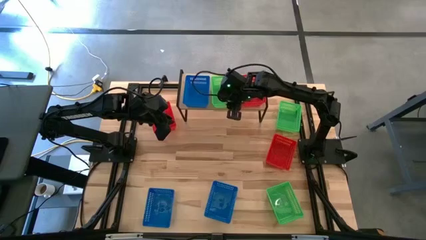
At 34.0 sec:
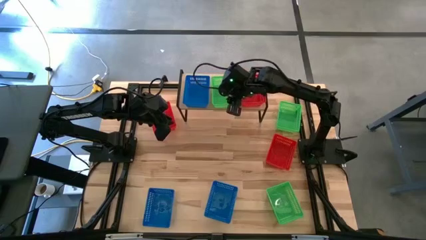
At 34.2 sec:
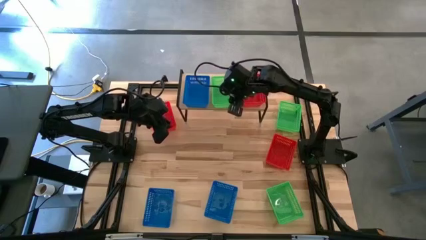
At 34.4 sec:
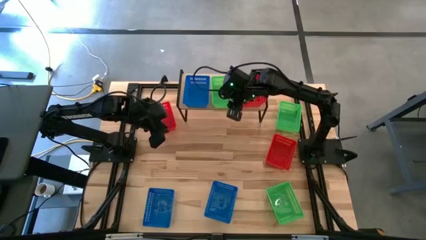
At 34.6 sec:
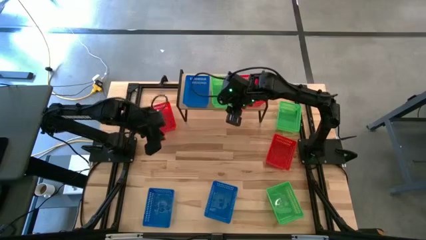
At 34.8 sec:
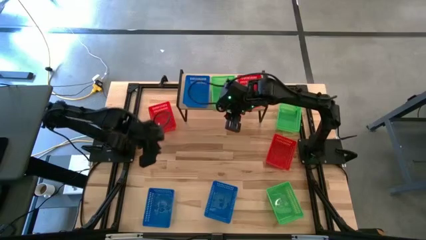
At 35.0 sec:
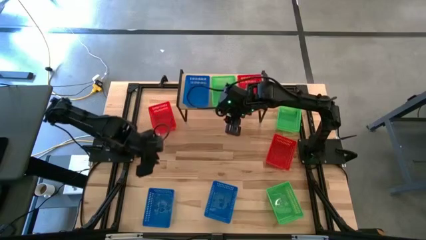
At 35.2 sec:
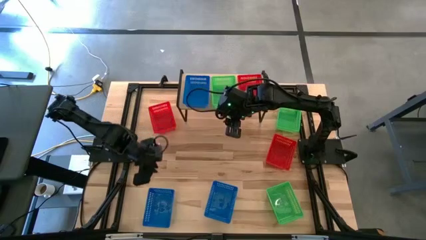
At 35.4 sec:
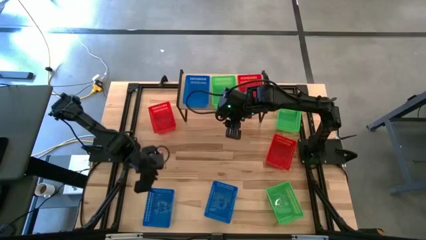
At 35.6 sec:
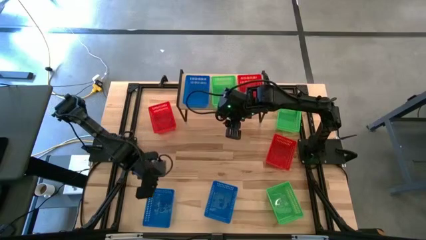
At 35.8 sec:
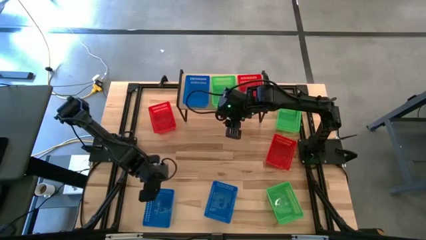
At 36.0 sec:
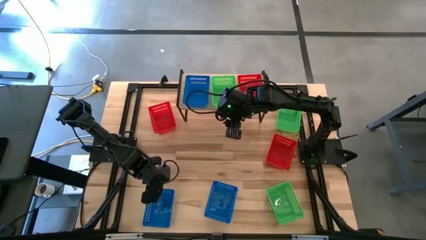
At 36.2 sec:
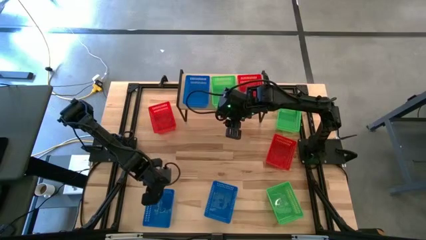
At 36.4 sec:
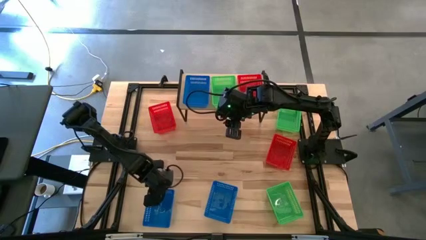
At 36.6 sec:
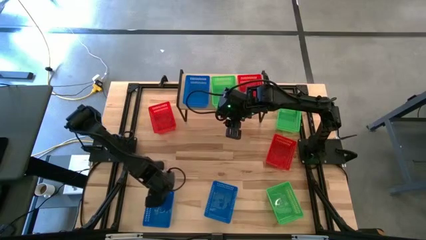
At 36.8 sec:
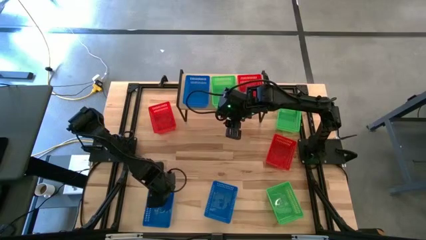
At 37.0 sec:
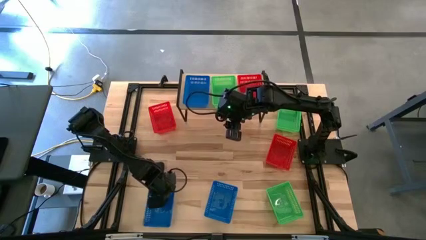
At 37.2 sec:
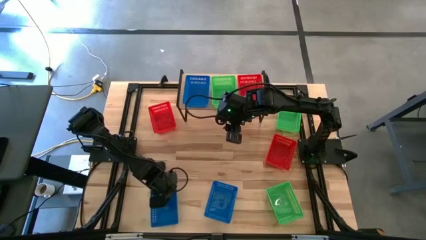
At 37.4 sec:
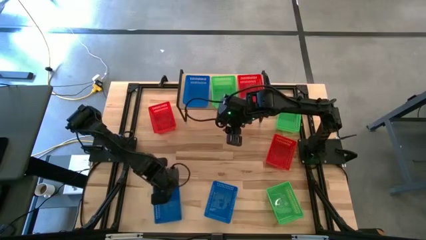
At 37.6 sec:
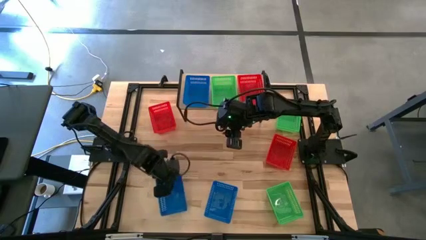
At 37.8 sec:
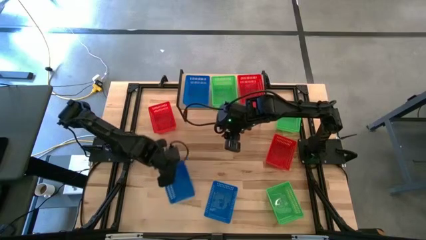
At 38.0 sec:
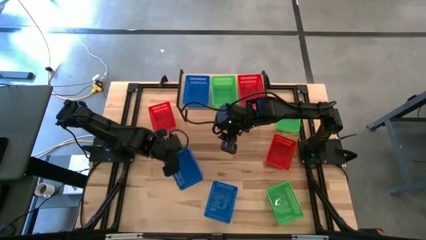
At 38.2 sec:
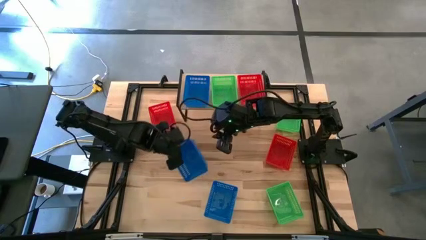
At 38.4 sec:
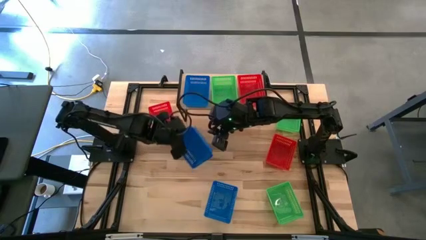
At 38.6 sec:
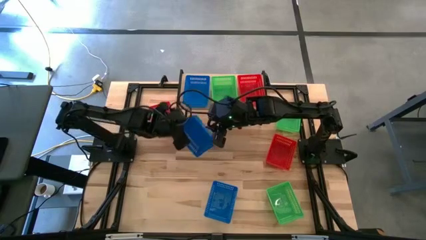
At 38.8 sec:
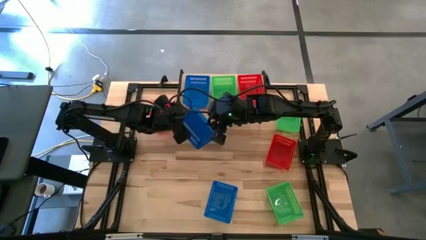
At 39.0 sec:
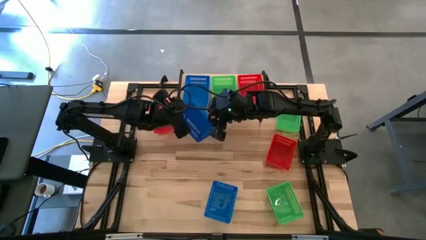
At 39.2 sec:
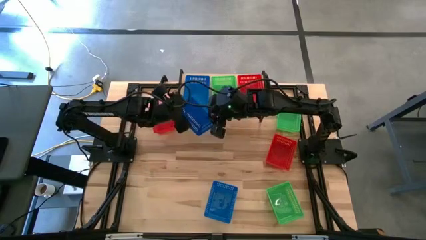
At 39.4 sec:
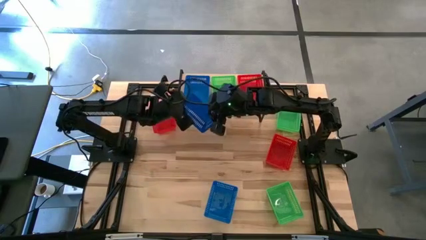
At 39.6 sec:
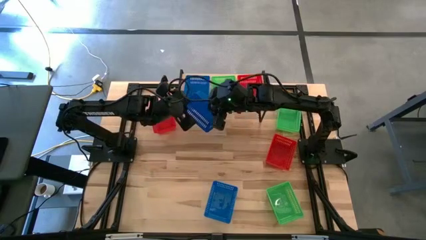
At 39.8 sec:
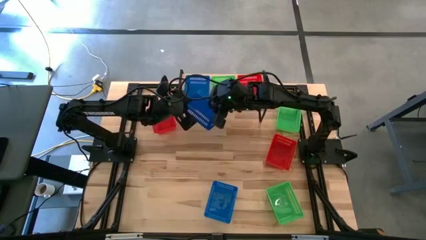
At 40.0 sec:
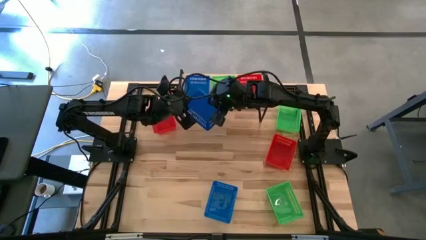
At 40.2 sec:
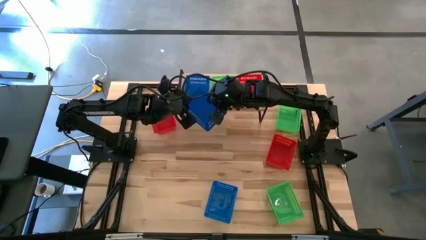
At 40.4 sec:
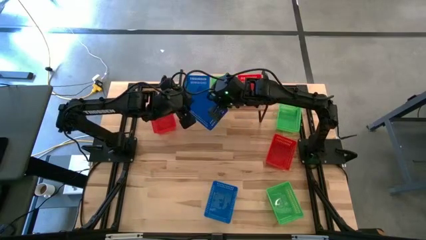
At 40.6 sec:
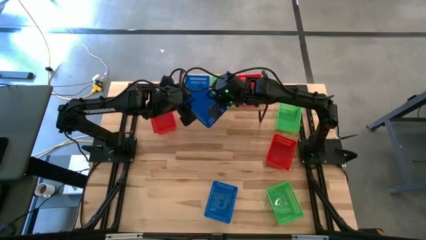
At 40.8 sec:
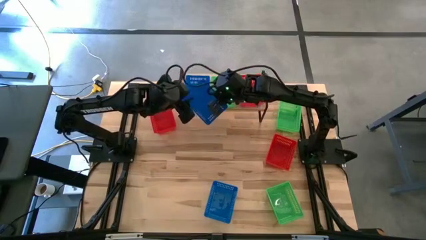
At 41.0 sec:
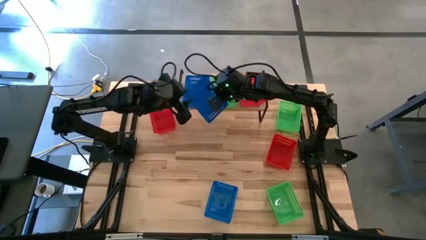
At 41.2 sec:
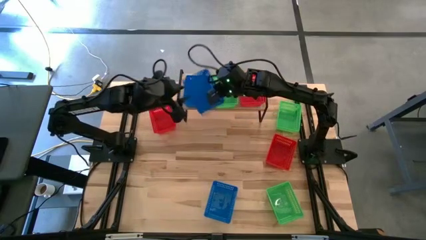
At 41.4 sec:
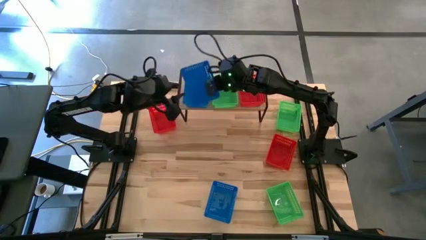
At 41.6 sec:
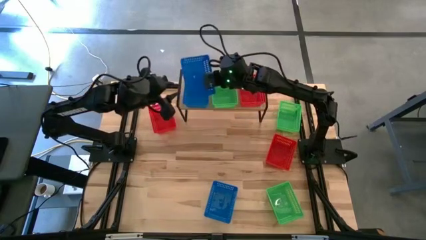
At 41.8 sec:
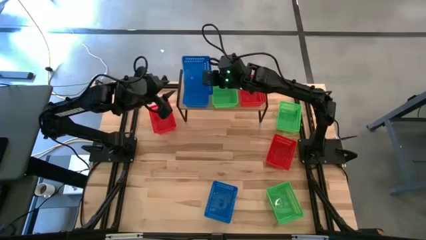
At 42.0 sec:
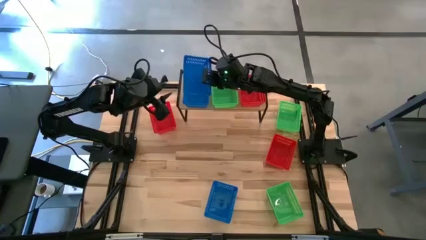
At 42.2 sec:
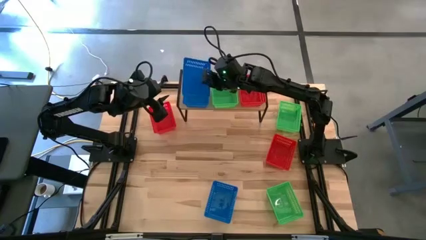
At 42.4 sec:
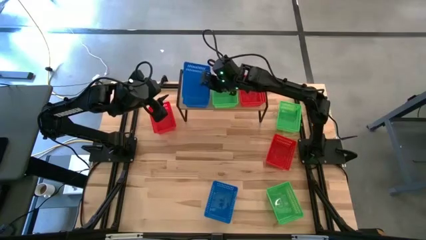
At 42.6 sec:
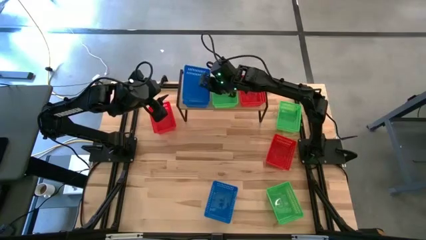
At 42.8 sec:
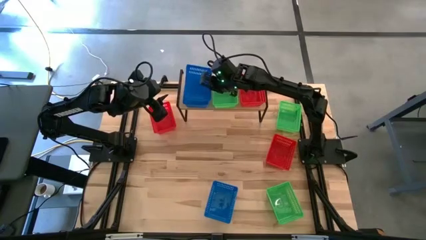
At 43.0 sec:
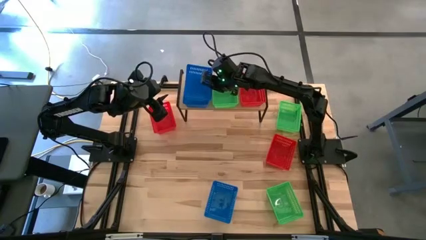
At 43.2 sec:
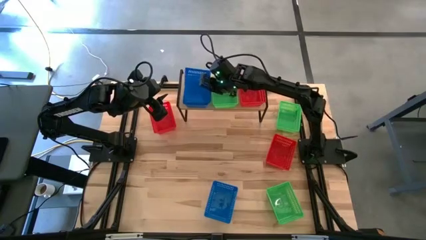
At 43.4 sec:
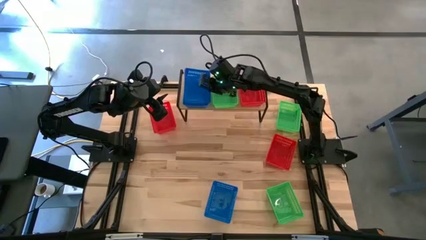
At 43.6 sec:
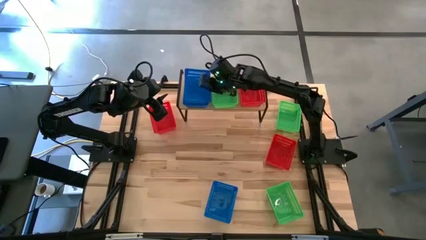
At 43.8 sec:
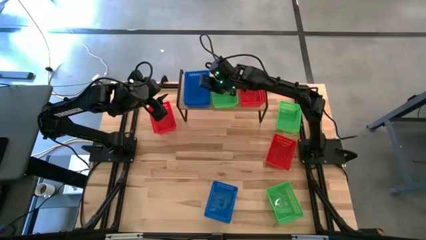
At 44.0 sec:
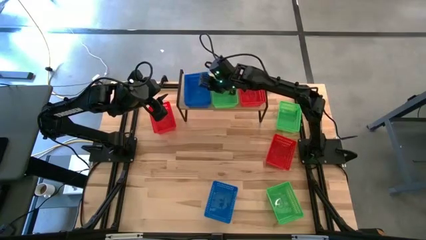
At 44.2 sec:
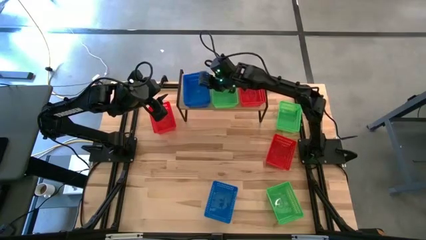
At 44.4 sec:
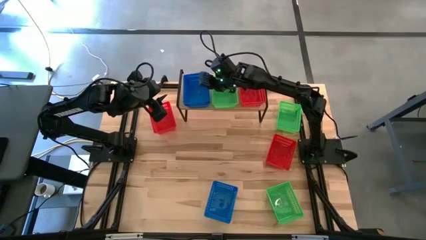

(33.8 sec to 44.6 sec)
Task: Stack baskets on shelf by color
Stack the left blue bin on top of the other blue bin on the shelf

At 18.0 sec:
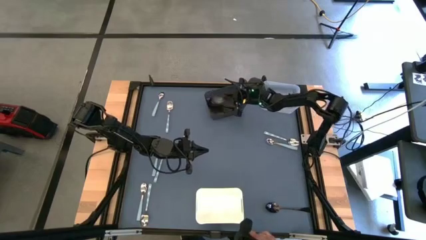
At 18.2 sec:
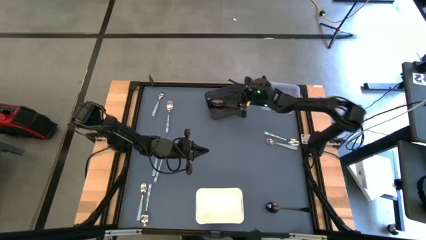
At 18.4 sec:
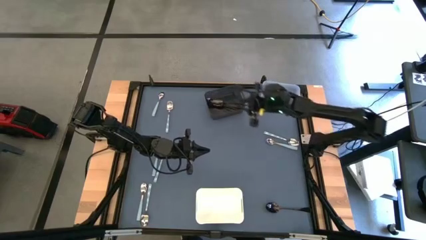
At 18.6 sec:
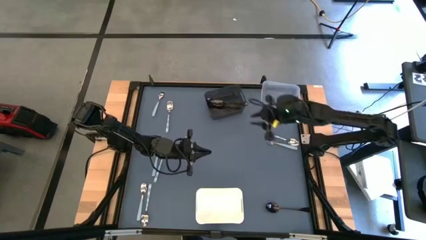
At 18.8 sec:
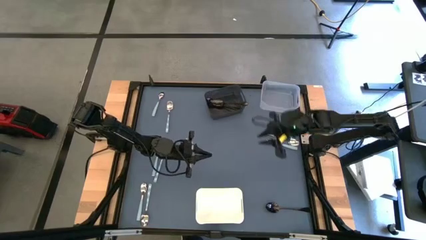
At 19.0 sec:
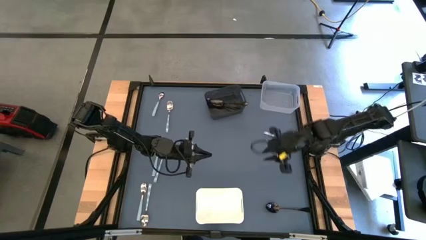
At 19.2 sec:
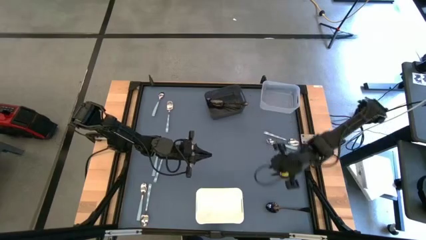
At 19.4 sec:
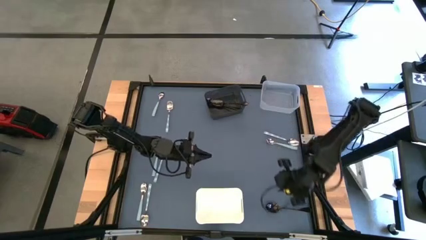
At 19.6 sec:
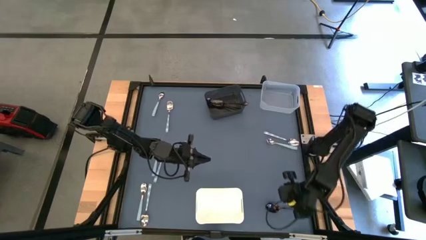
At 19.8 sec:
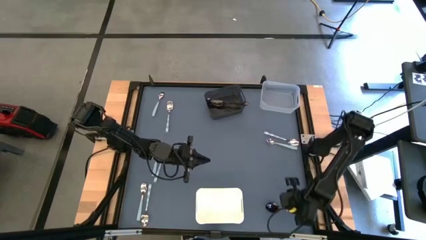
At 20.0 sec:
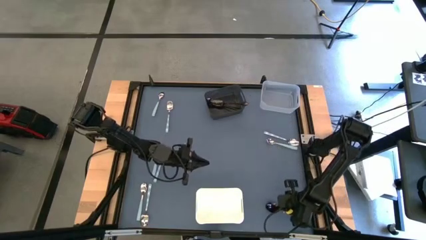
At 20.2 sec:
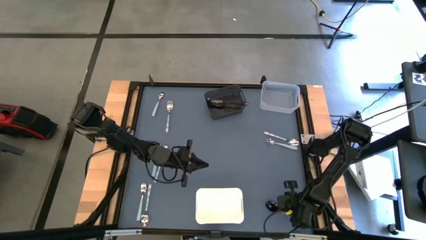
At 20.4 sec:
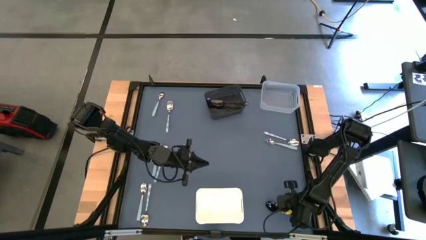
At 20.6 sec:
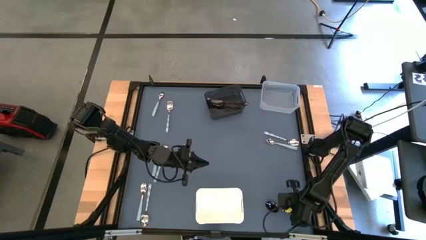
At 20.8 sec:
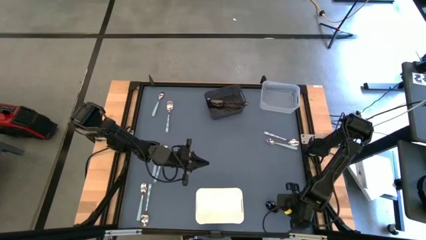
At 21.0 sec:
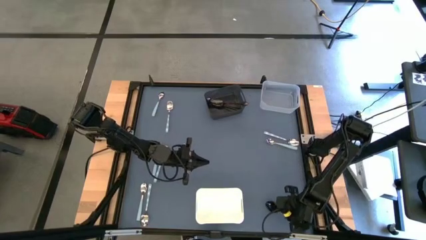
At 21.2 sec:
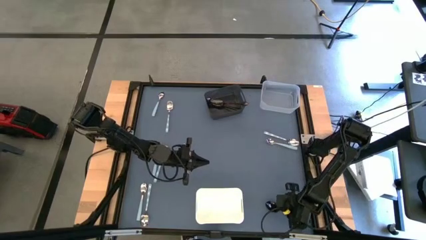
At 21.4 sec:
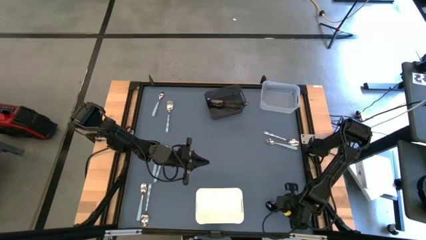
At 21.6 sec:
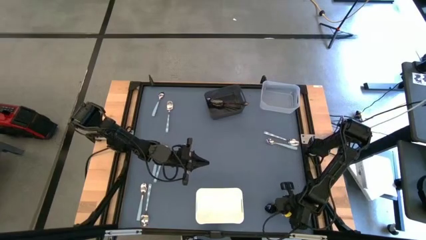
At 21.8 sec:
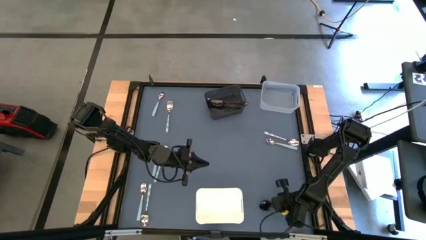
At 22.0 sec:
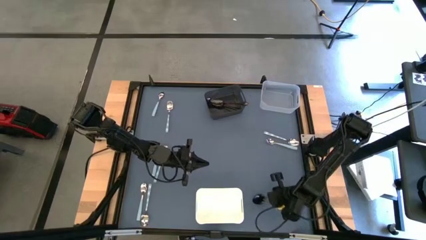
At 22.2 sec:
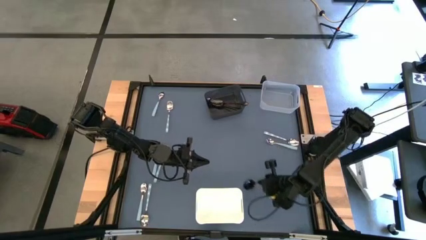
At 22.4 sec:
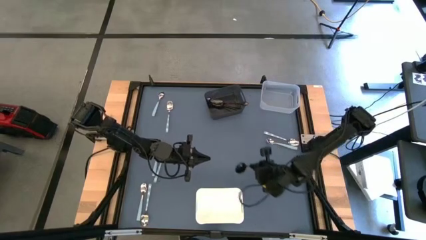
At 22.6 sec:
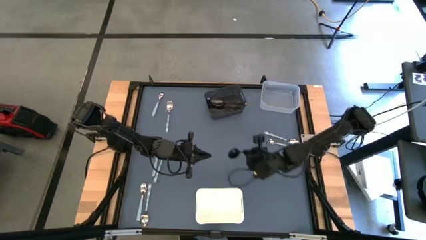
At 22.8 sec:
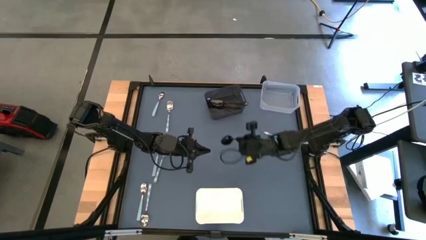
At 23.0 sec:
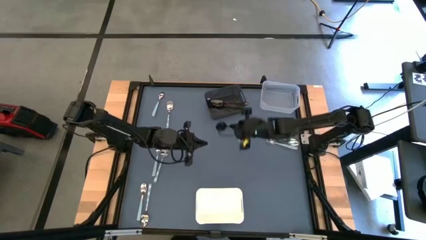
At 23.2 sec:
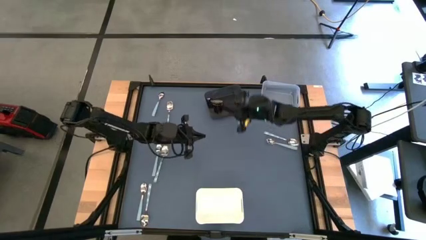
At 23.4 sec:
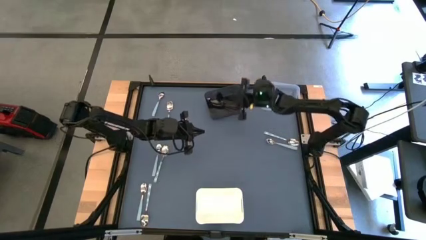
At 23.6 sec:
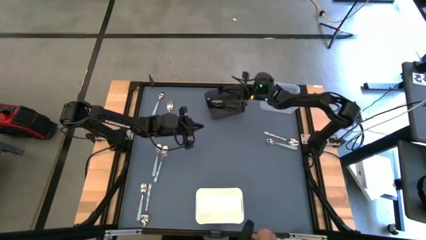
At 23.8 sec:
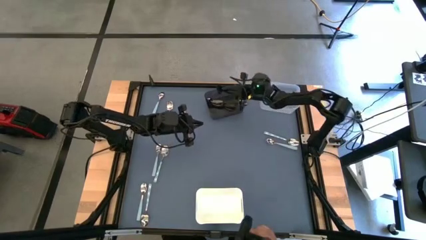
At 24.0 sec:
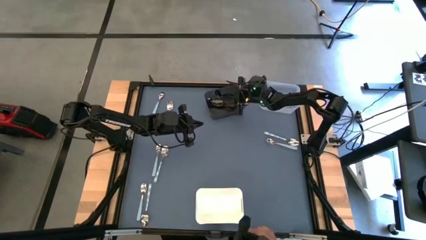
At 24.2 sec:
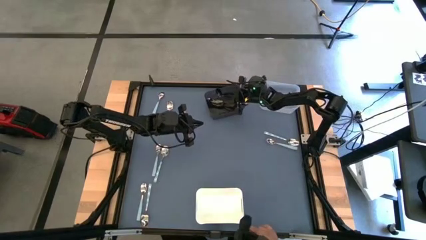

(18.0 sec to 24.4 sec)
Task: Sort silverware by color (type)
Put the black spoon into the black bin
